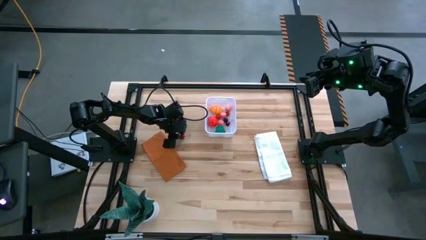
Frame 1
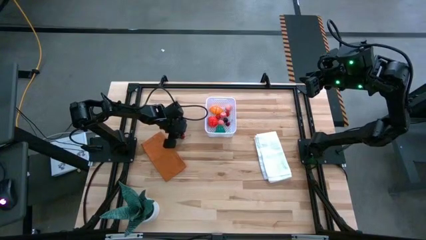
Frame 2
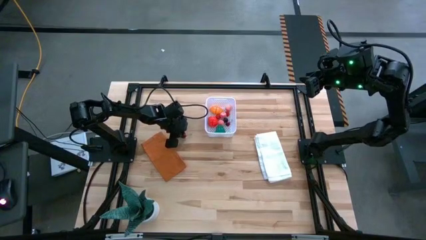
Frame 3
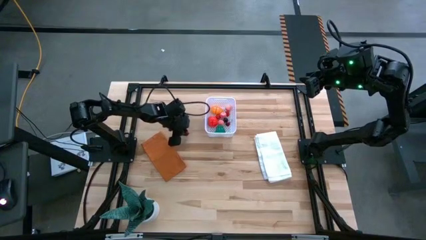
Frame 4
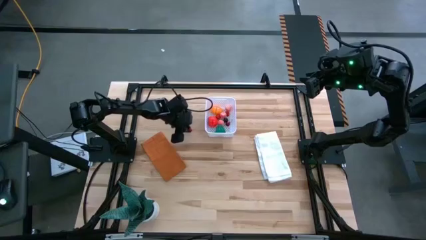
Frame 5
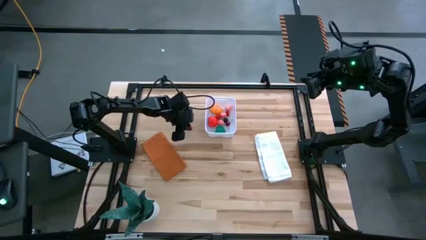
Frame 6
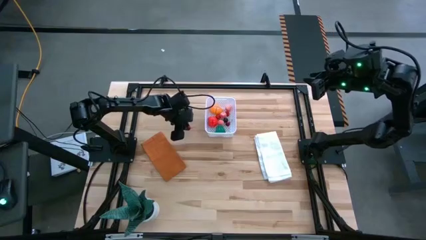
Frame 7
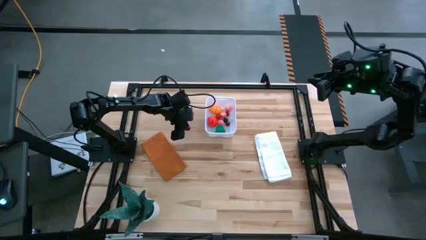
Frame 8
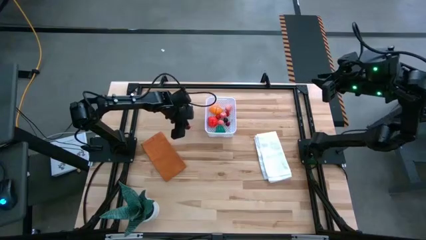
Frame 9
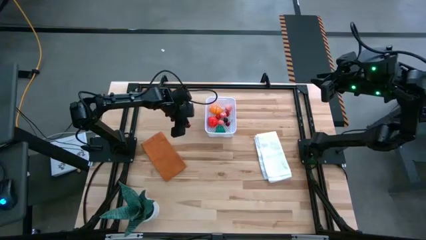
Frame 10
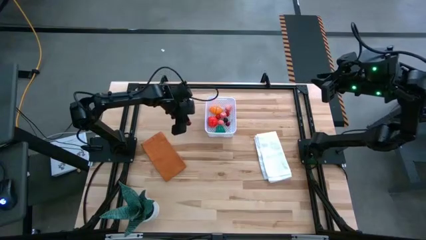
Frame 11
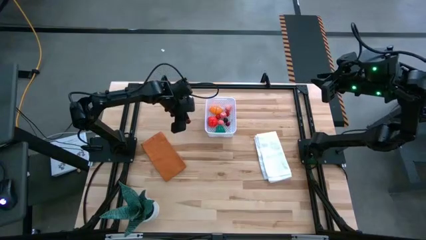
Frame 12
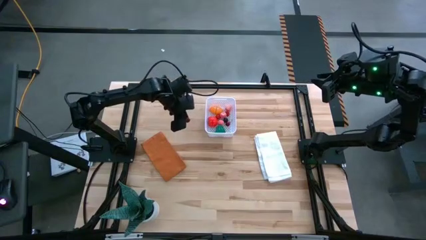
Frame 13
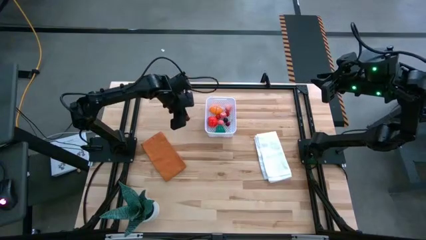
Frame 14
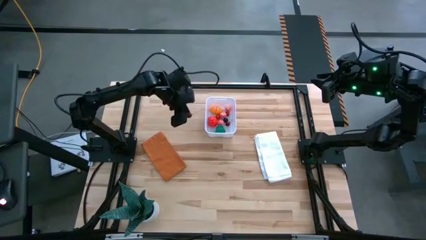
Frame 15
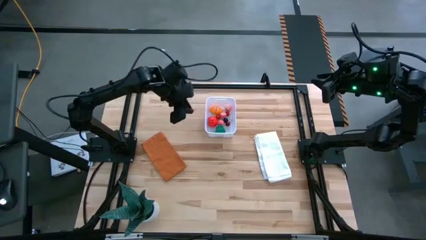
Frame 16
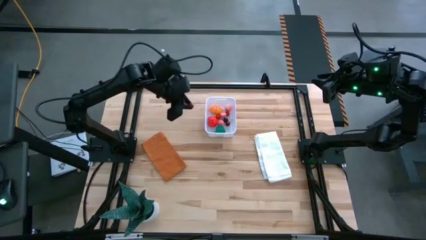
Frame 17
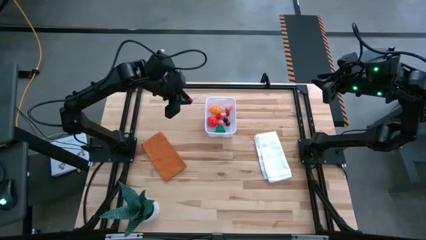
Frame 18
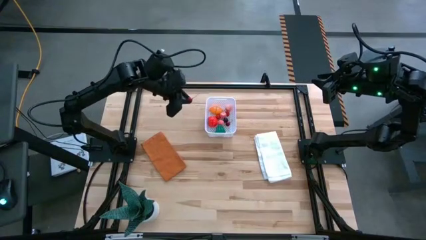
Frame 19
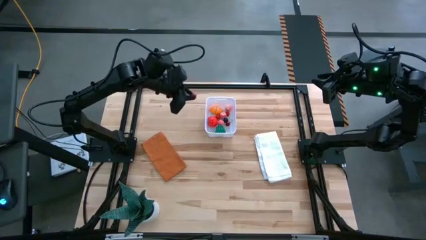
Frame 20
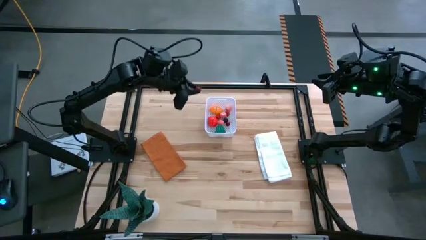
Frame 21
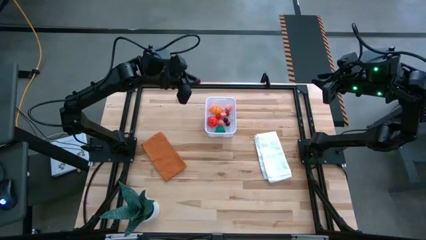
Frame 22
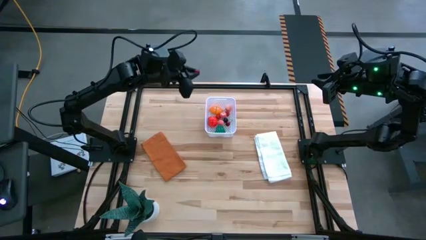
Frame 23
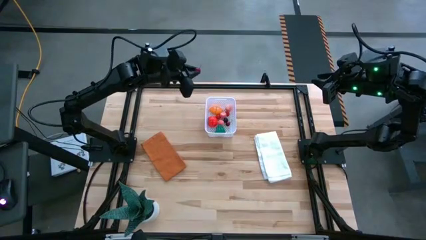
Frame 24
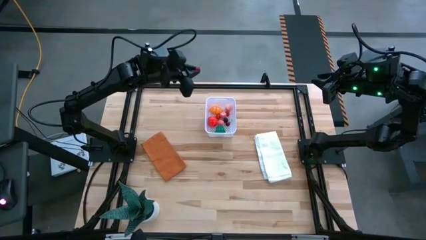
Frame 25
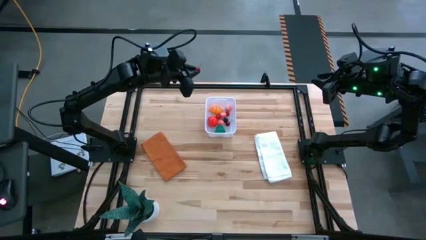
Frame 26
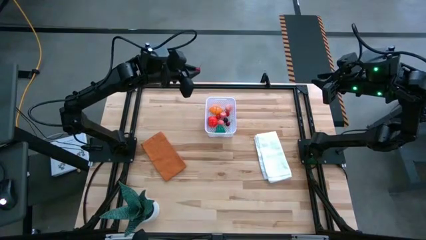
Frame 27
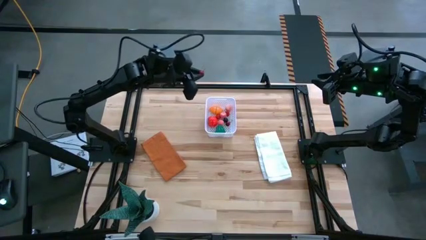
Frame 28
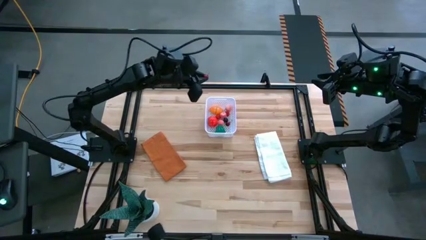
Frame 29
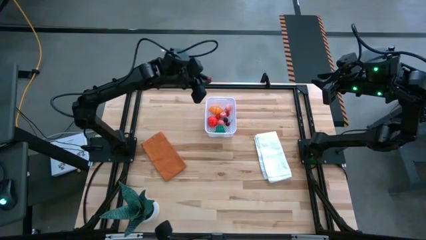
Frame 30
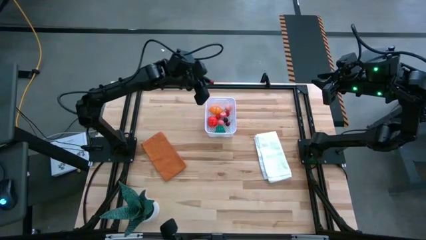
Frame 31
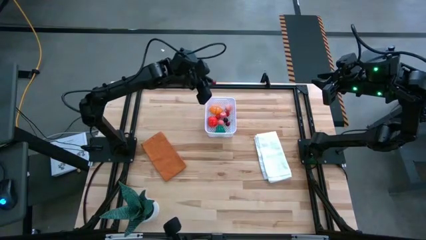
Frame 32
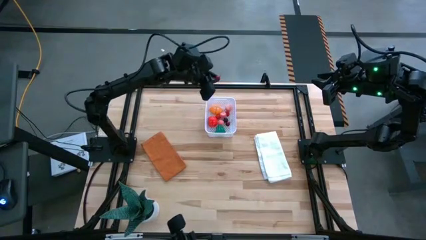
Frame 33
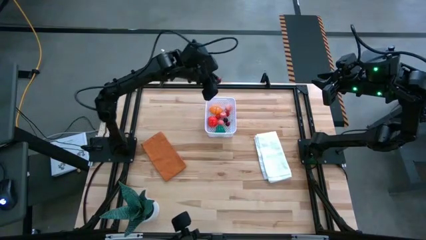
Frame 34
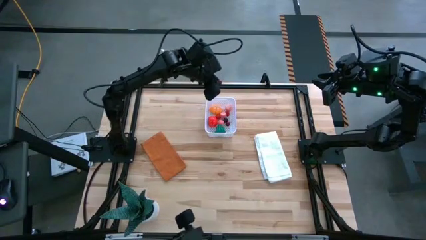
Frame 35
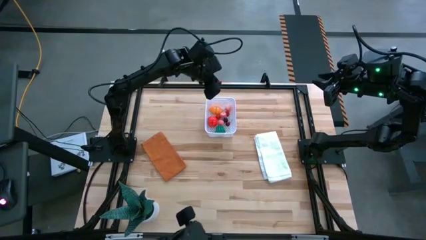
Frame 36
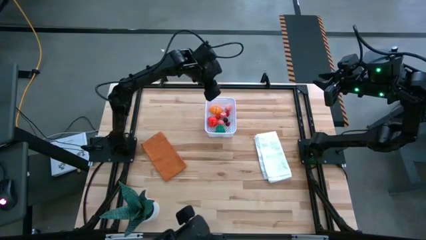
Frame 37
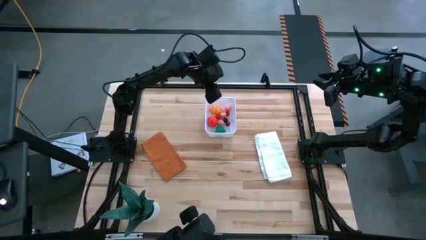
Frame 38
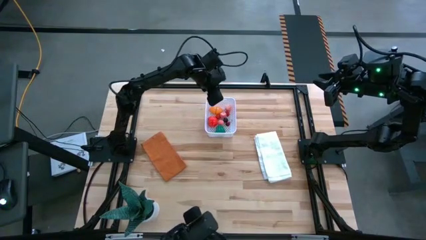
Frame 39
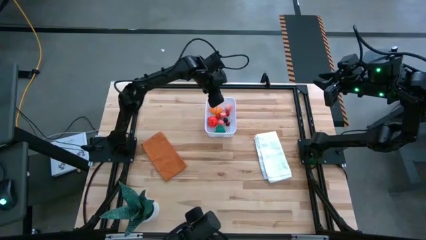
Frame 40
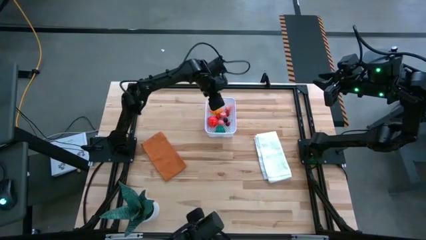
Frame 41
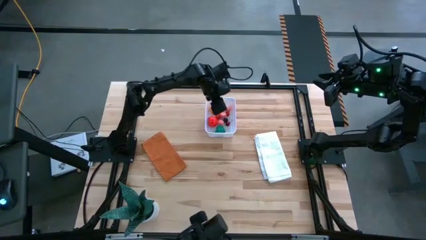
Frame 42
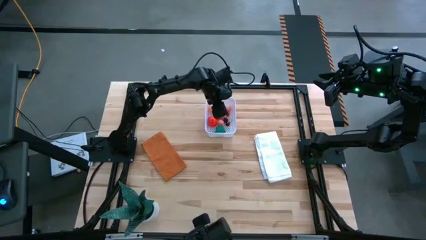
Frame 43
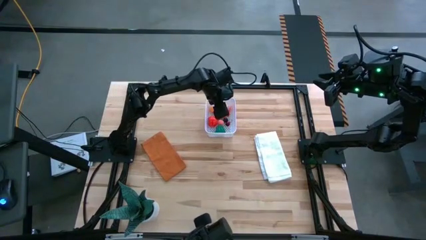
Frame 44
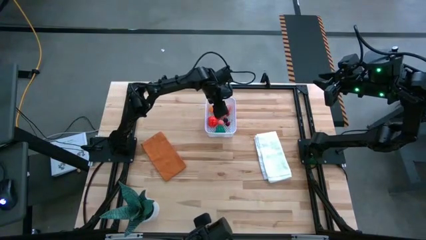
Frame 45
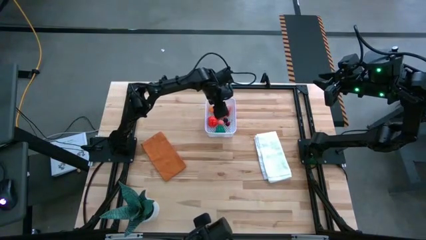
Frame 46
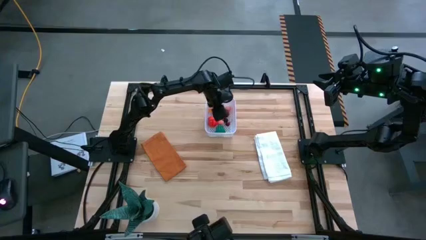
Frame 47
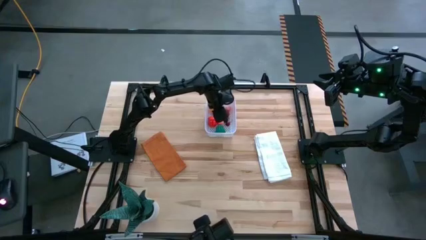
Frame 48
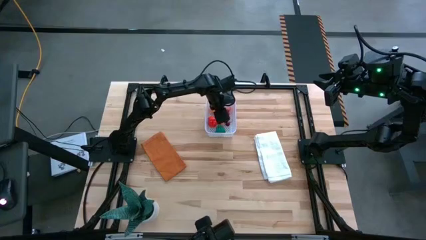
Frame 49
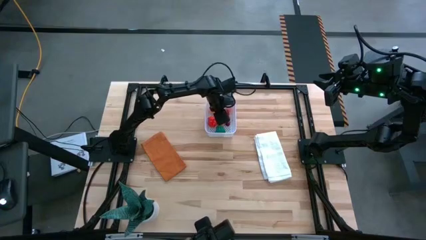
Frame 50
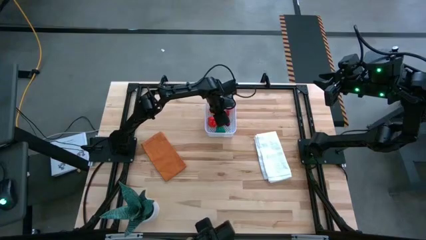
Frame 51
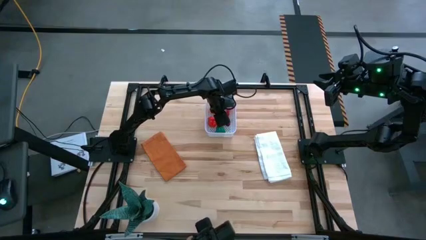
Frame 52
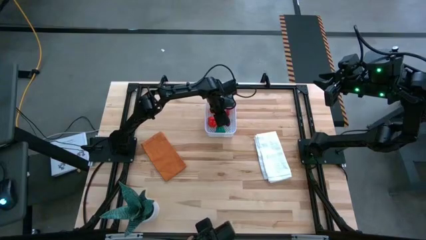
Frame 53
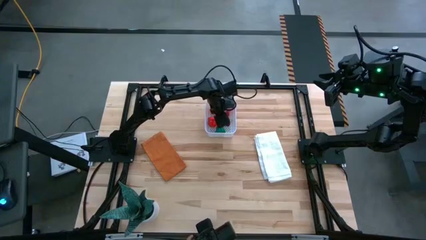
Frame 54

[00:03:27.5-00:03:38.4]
Task: Pick and placing Produce into tupperware
Put the red cherry into the white bin

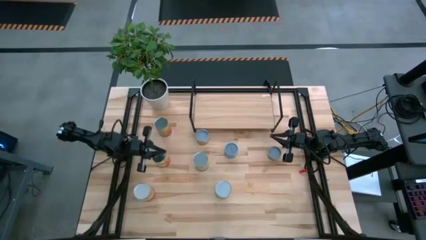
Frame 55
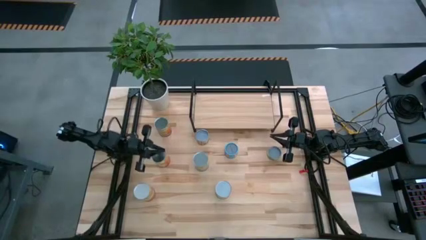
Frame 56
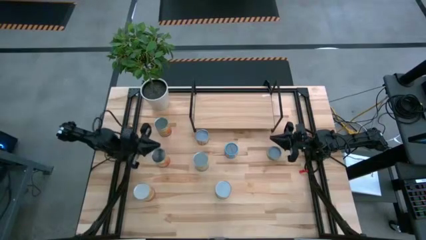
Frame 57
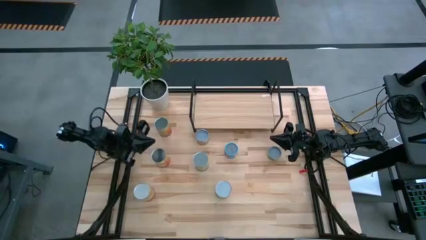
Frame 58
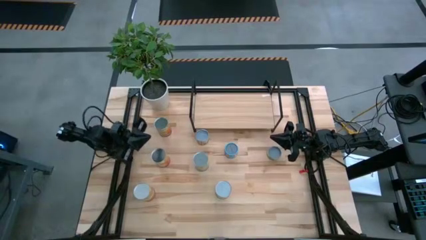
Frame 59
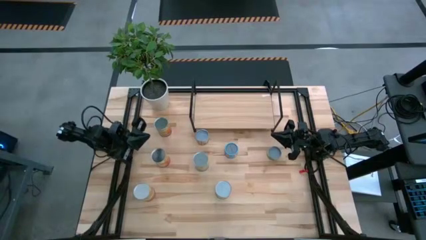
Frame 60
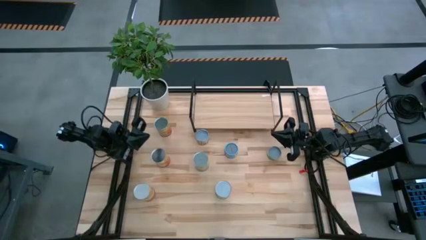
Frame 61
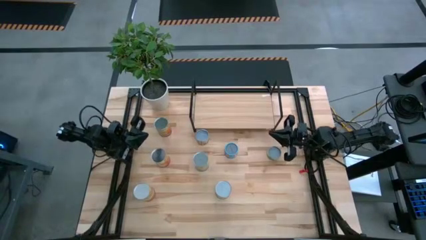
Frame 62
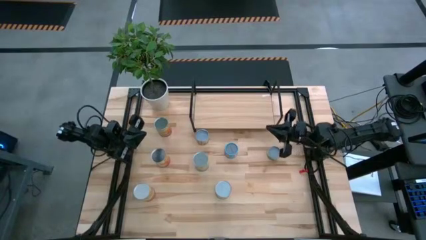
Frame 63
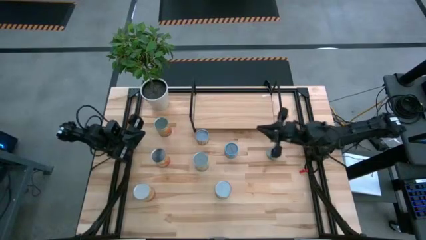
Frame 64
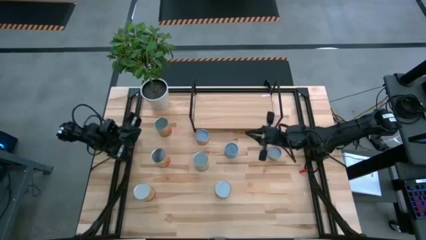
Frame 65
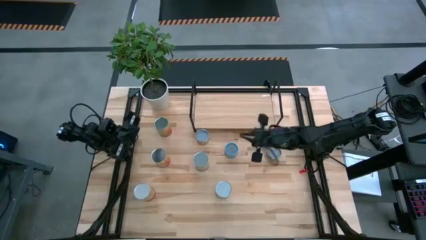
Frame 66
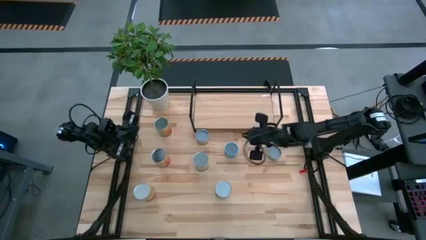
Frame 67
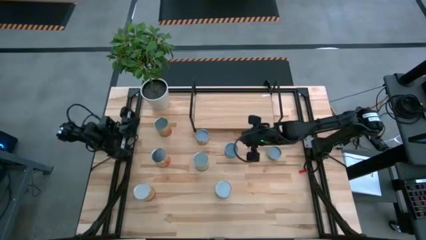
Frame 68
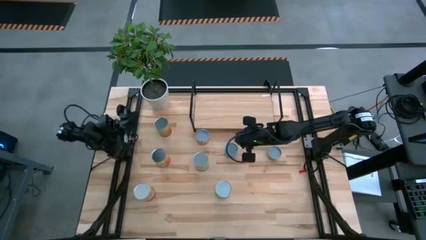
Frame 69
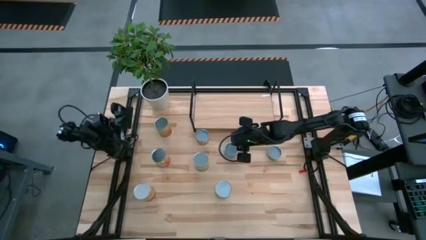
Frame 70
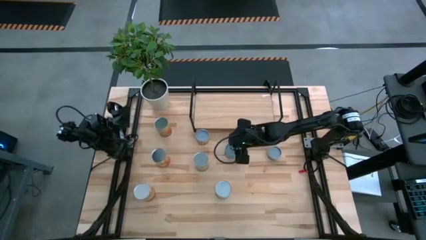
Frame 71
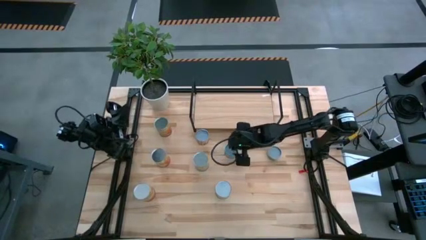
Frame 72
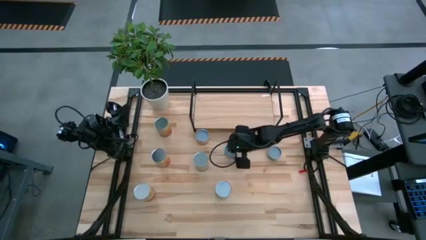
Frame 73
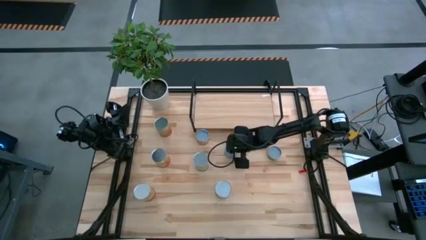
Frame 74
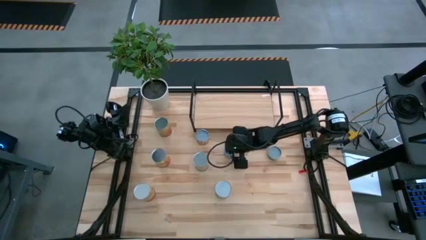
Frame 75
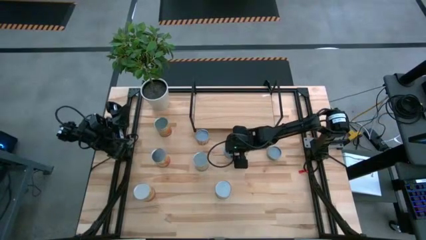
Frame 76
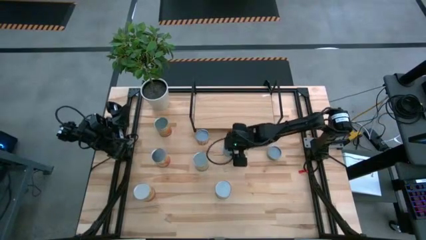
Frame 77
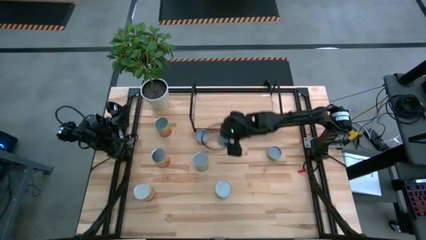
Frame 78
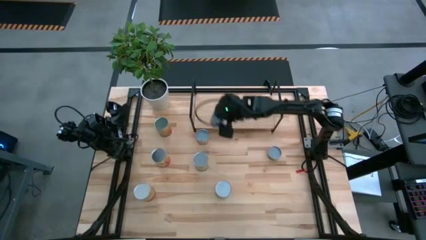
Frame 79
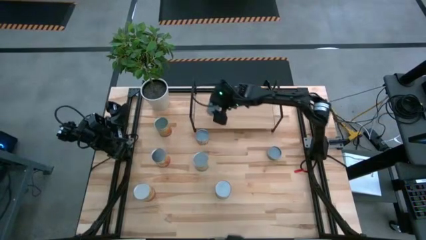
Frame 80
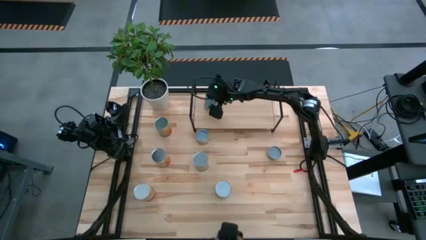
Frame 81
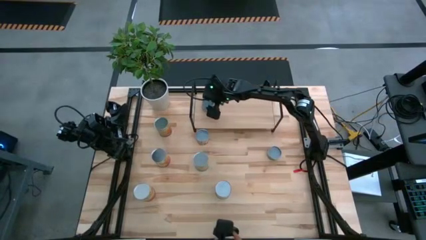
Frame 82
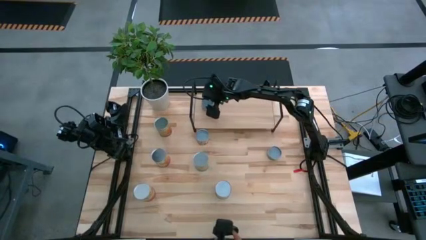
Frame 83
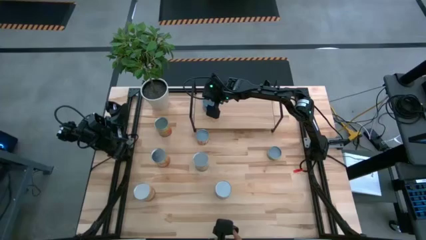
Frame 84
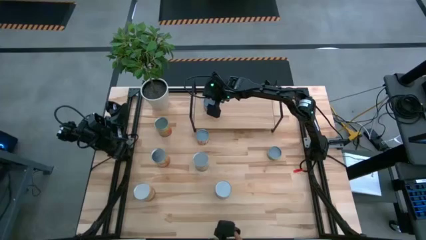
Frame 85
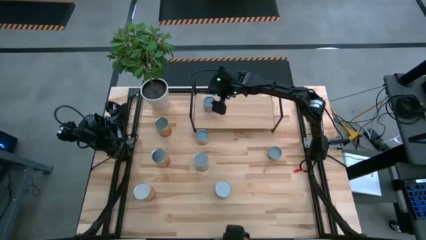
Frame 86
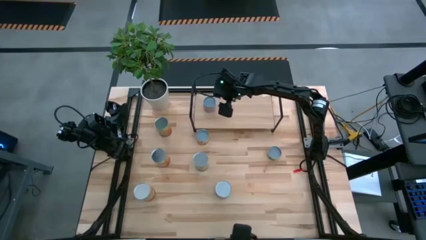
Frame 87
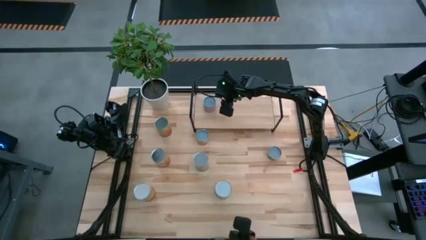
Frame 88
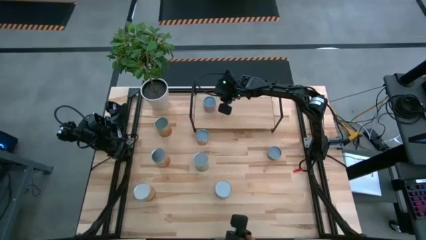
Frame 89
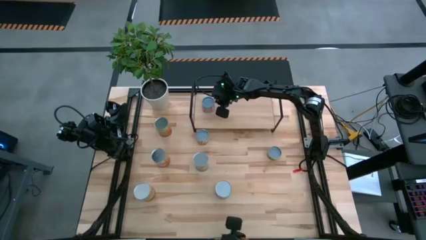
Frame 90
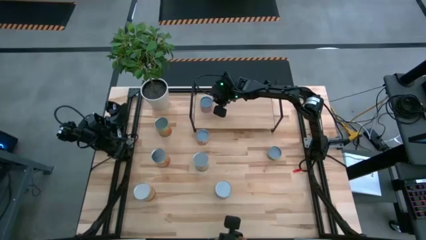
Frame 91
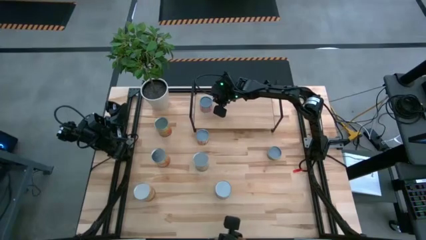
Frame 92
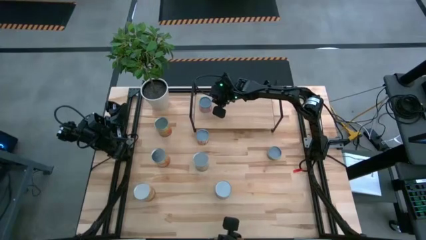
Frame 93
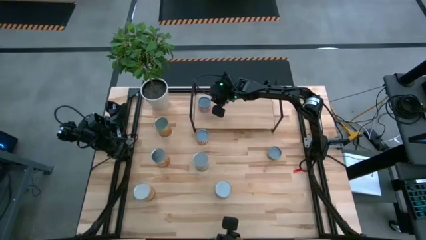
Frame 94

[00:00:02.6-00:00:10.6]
Task: Pick and place cans onto a shelf
Put the small canned corn on the shelf
